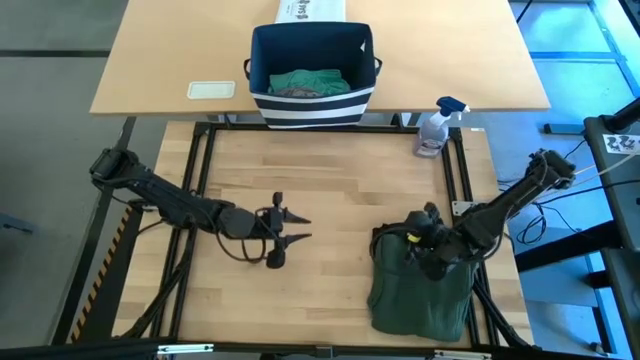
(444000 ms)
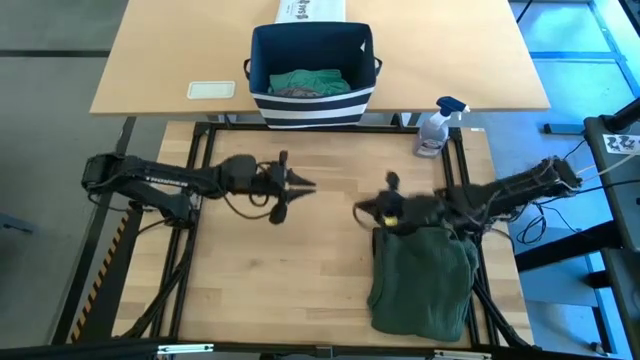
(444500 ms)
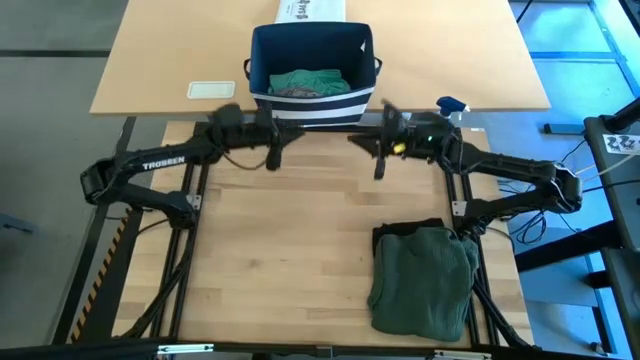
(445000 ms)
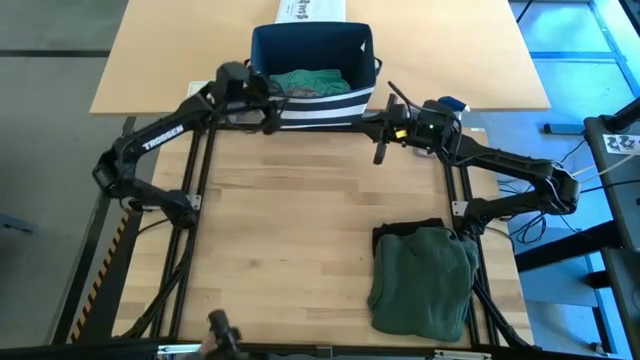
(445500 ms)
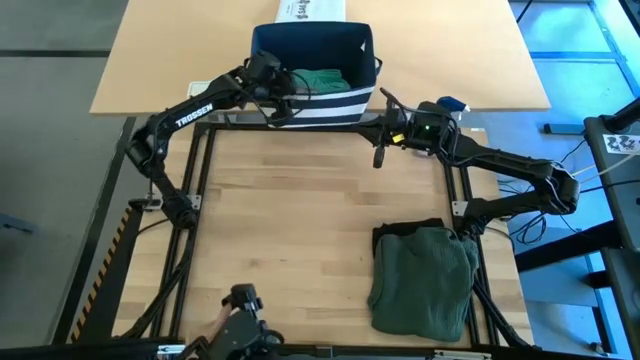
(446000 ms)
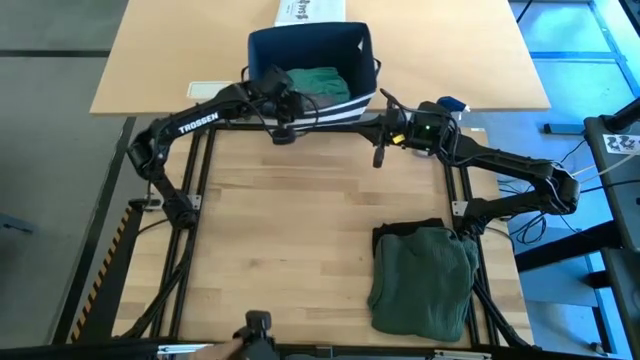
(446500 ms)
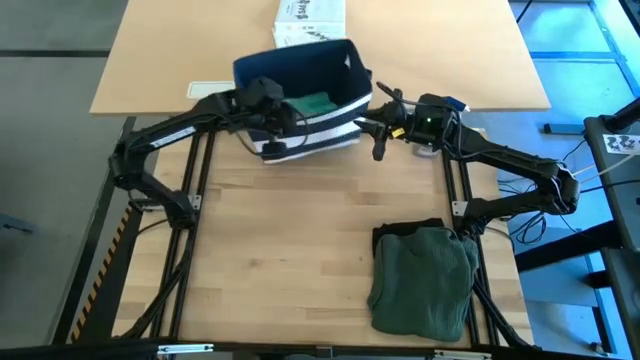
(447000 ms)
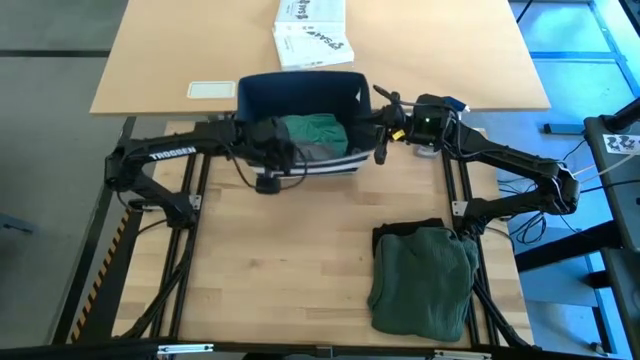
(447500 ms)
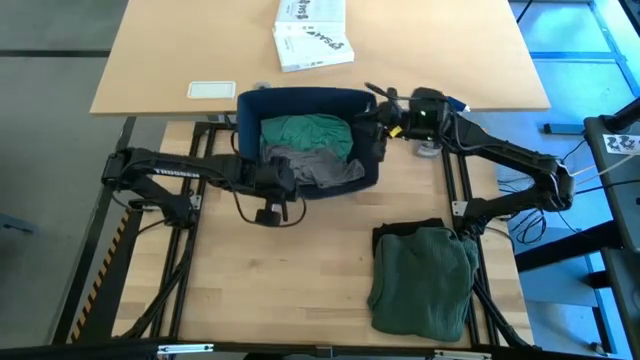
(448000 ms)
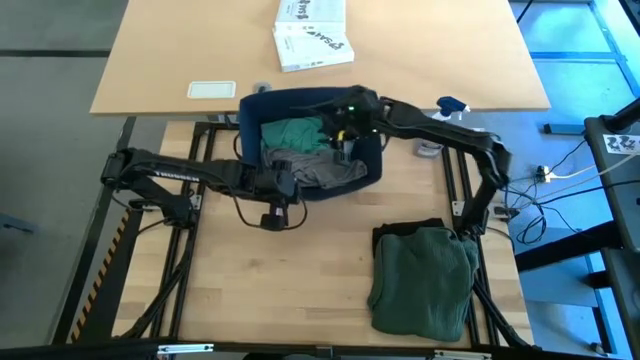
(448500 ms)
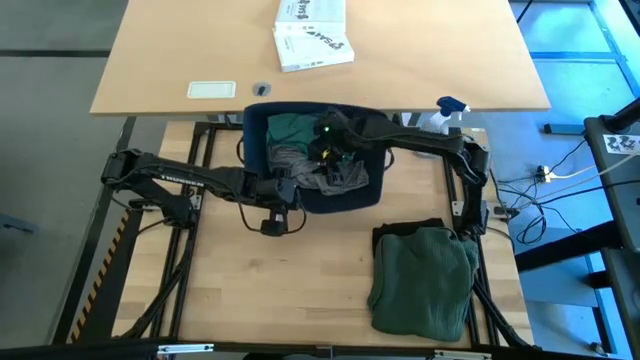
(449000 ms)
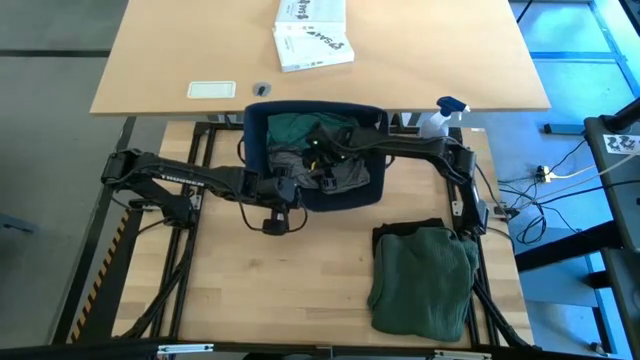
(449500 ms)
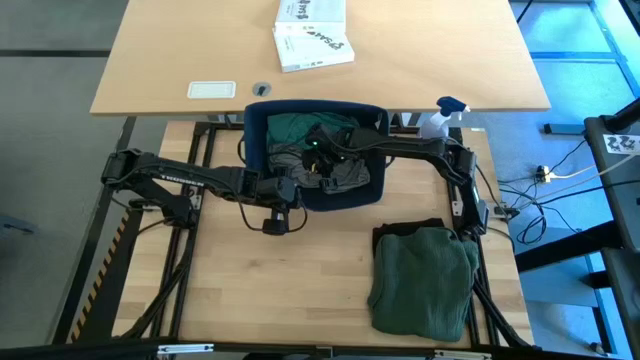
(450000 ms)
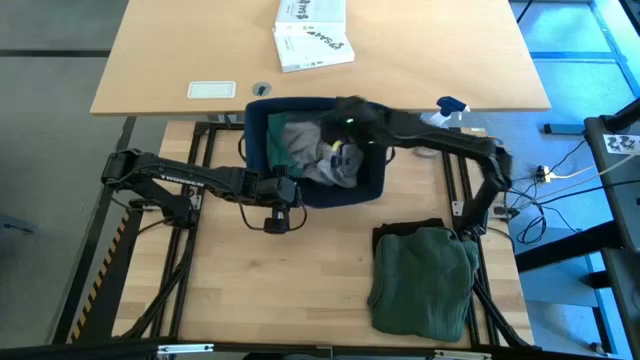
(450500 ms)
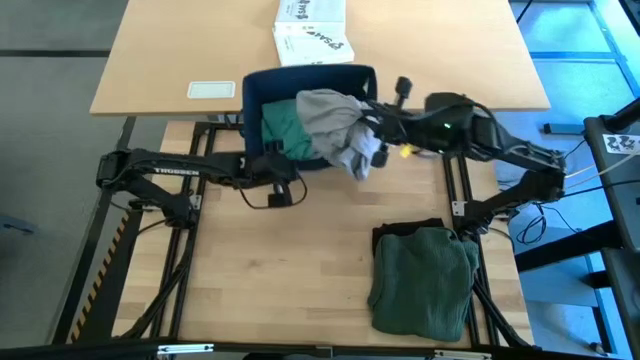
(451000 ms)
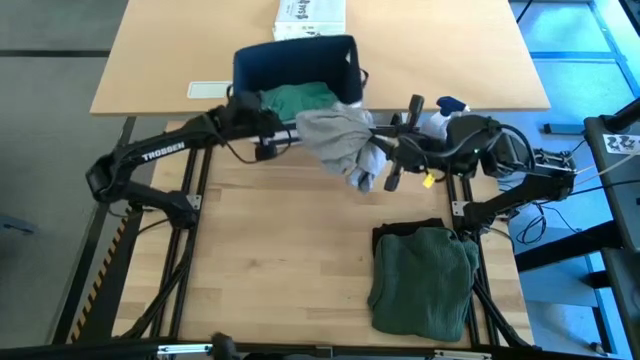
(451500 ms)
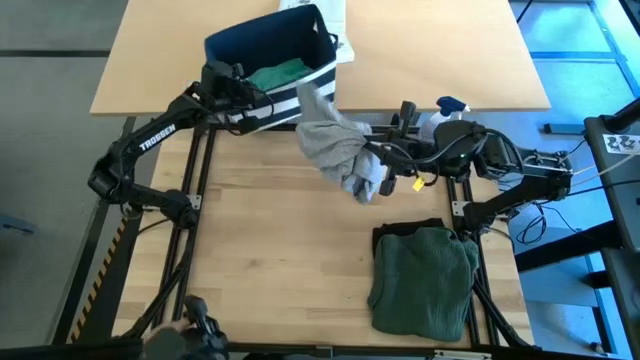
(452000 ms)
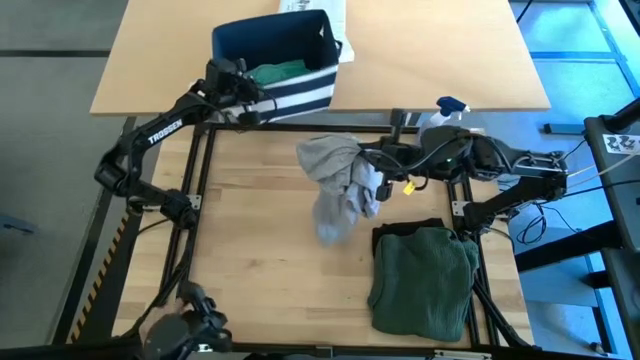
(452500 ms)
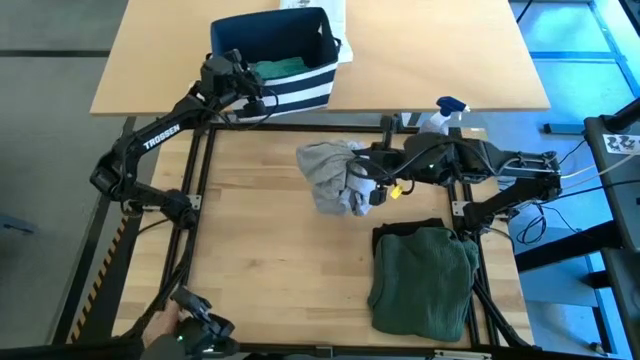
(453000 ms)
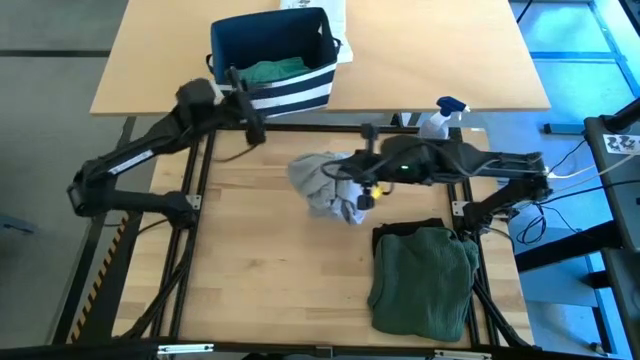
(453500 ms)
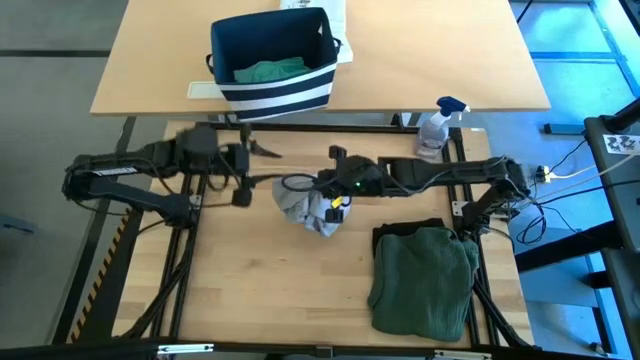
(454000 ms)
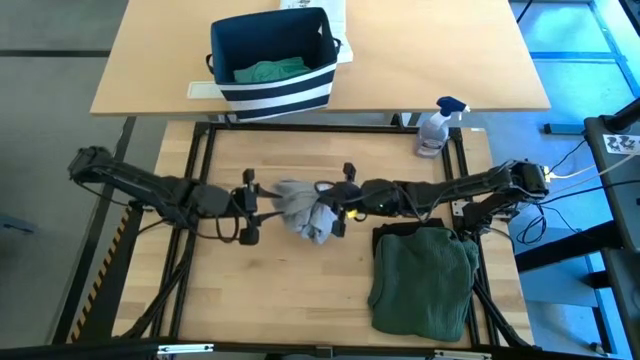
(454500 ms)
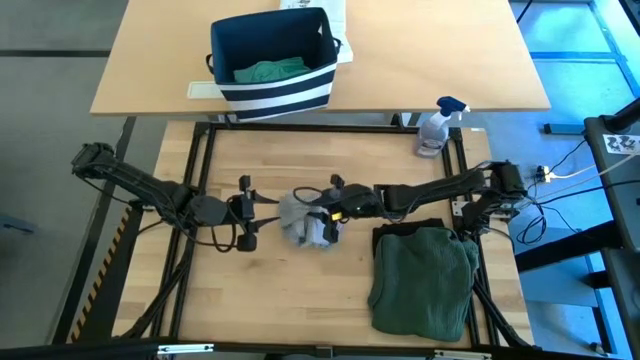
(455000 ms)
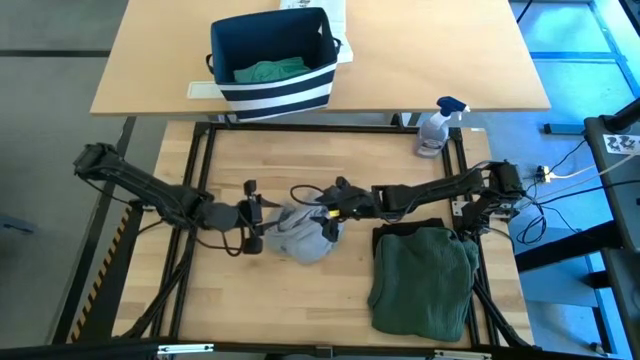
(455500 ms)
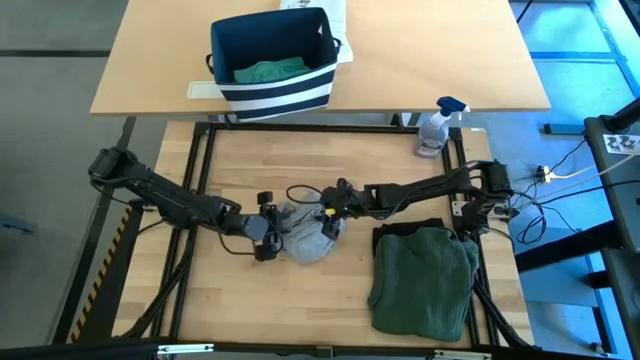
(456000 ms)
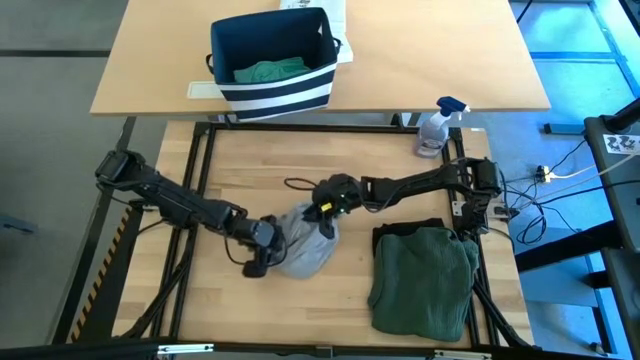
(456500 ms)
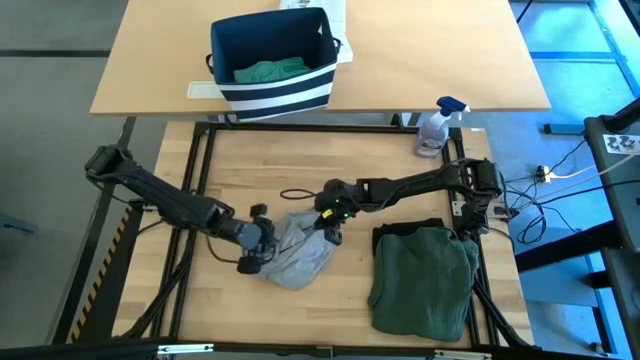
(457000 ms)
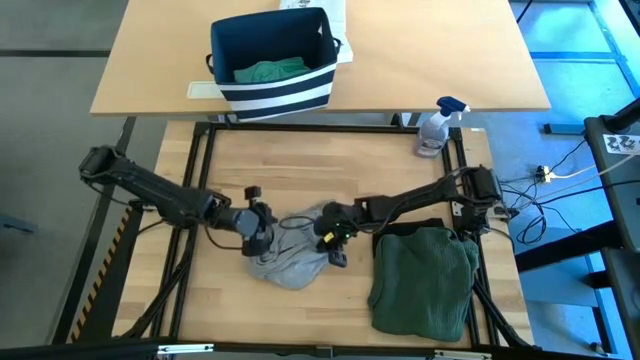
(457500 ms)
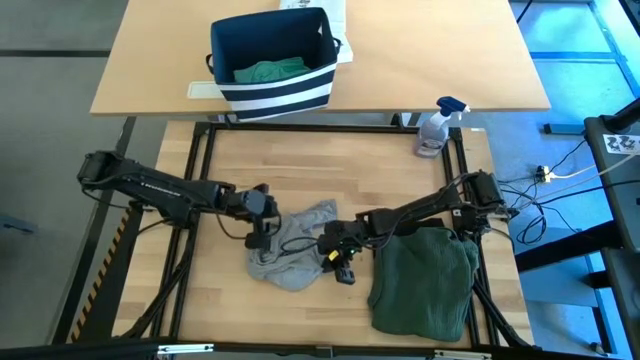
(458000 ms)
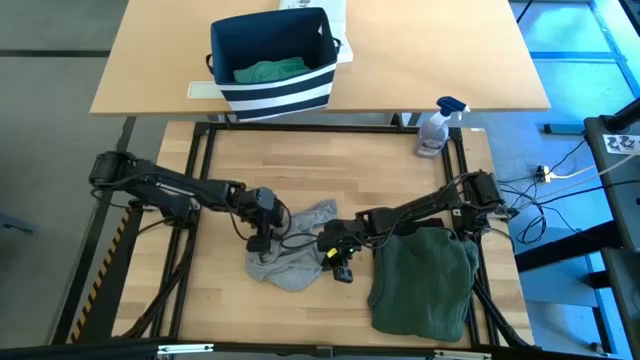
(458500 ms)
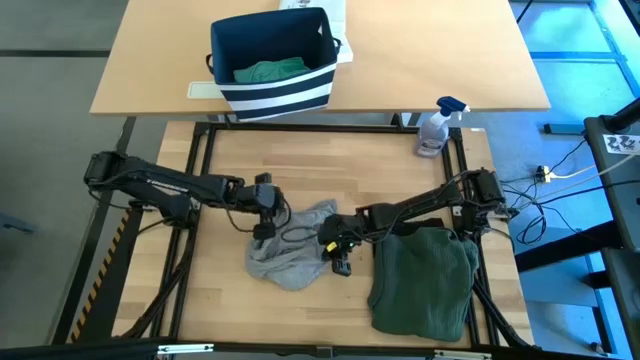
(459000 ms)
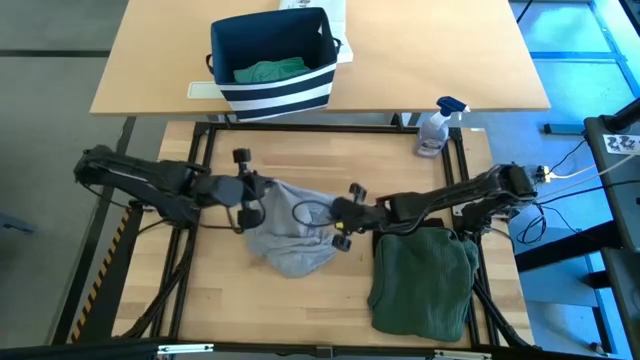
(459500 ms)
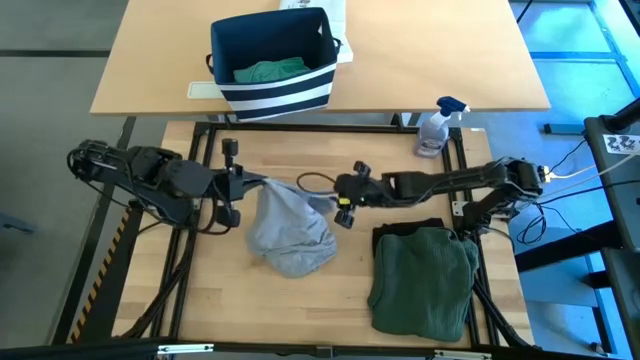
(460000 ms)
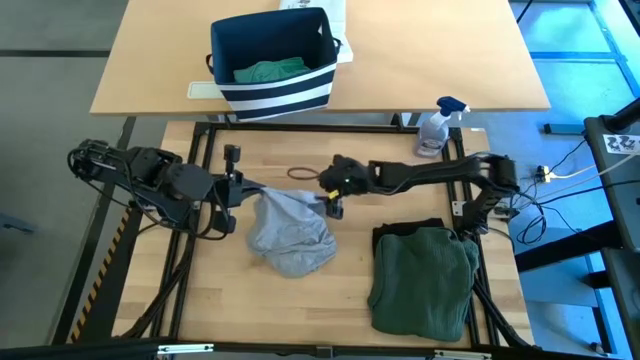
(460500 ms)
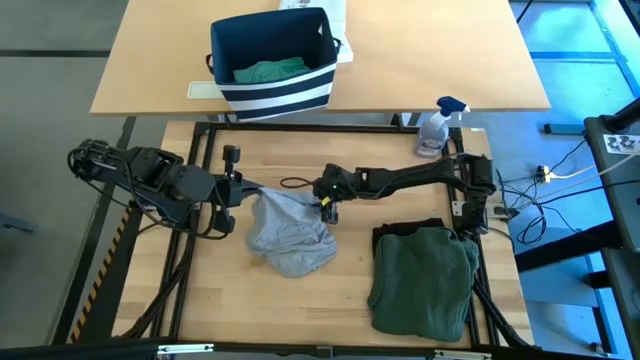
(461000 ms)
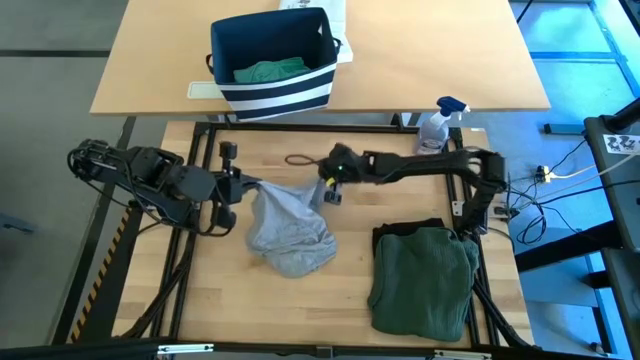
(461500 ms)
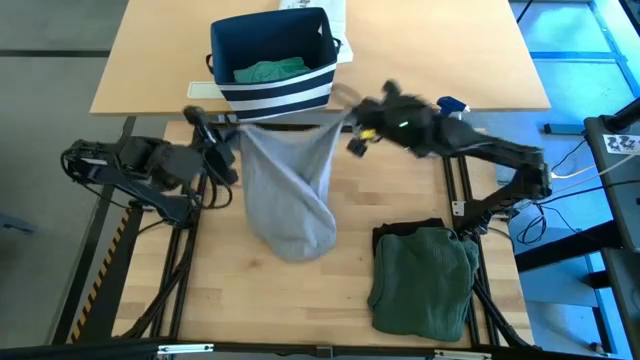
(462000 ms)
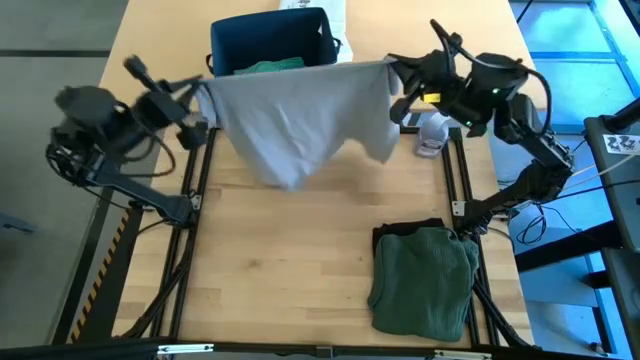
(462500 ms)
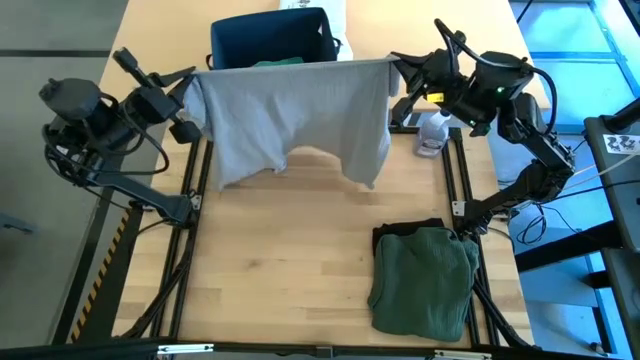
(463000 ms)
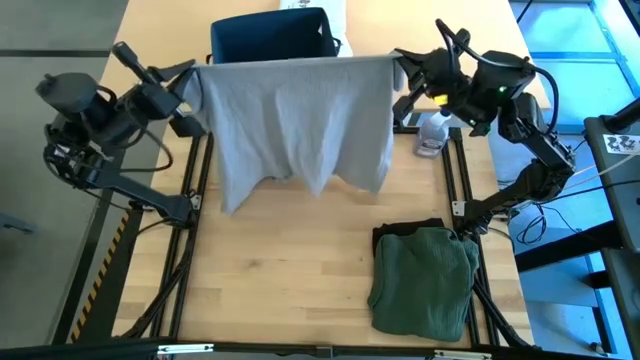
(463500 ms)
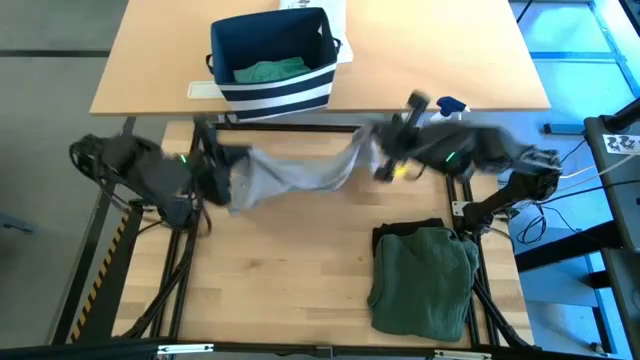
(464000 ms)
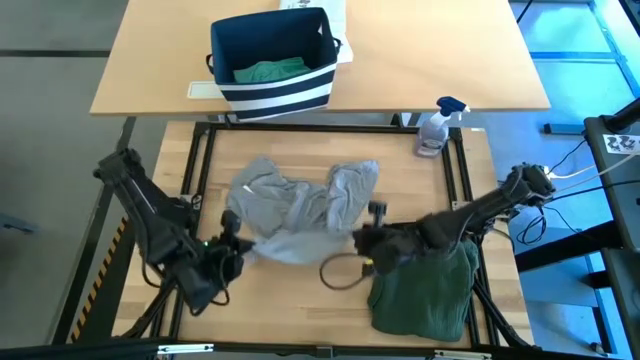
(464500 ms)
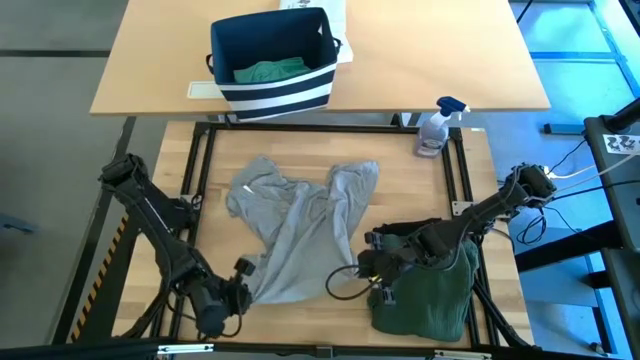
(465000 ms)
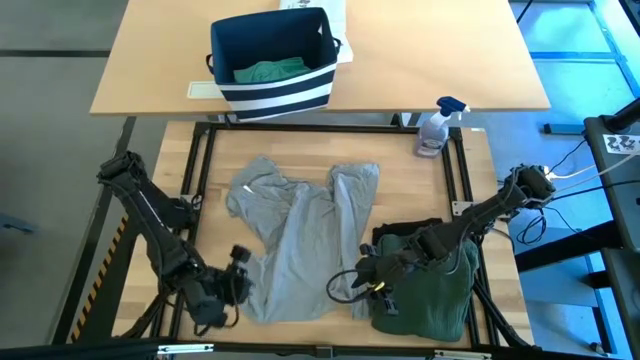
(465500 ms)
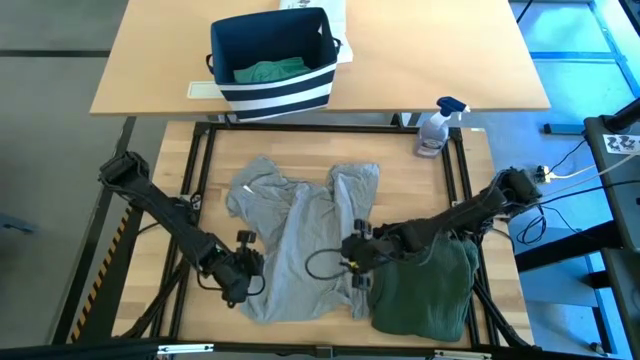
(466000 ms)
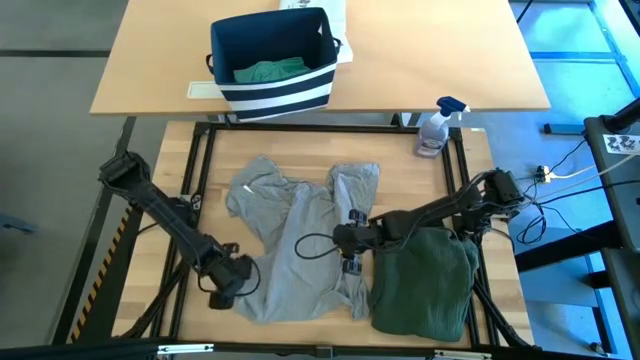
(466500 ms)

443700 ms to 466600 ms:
Task: Fold Laundry from Bin
Fold the gray shirt
